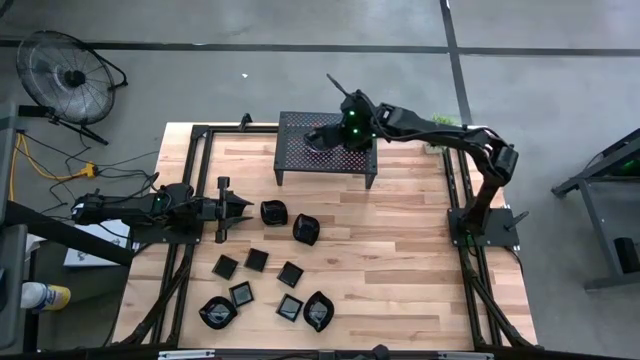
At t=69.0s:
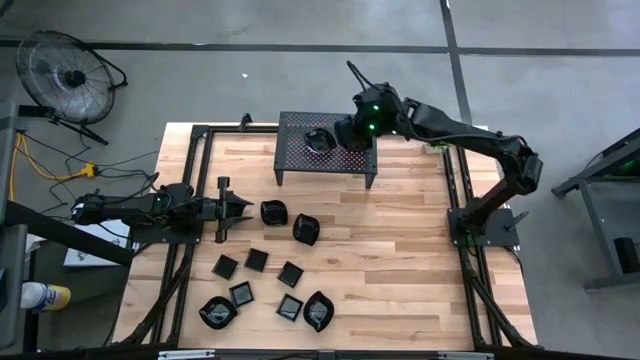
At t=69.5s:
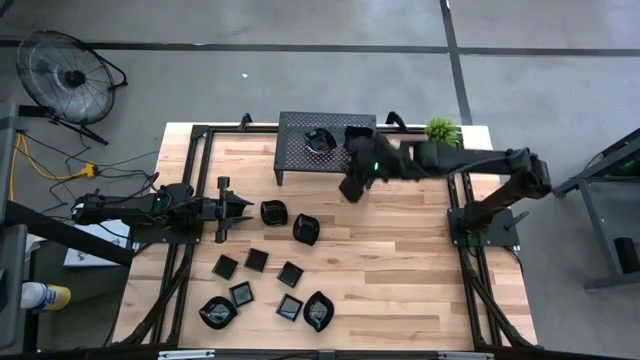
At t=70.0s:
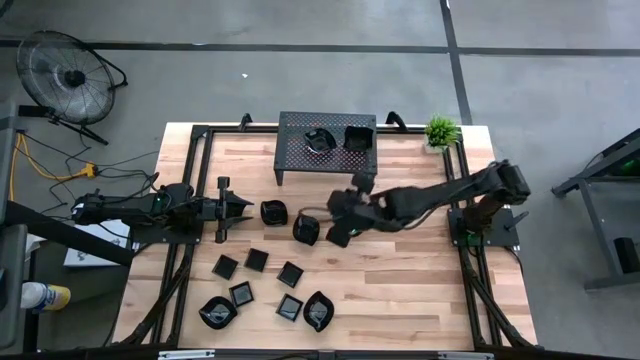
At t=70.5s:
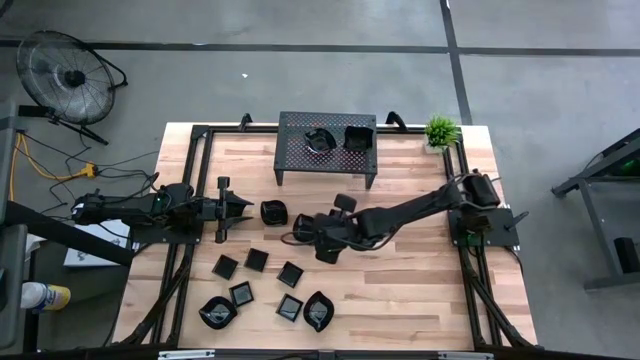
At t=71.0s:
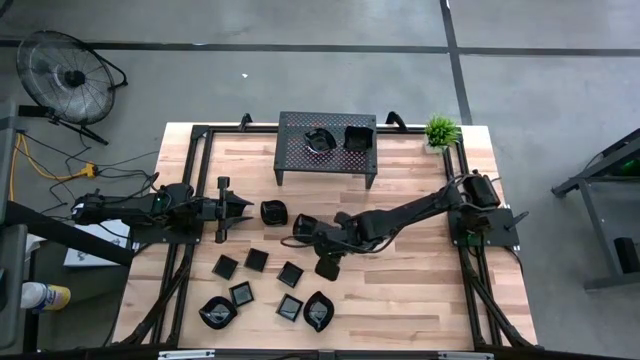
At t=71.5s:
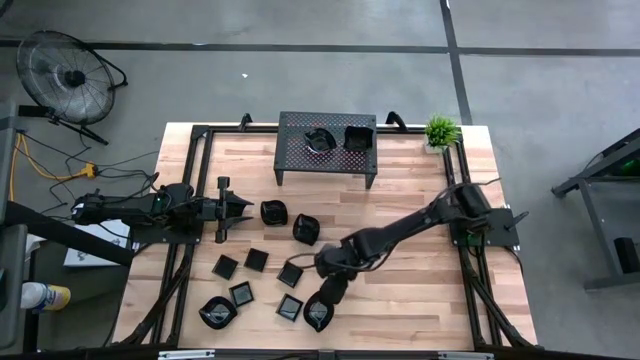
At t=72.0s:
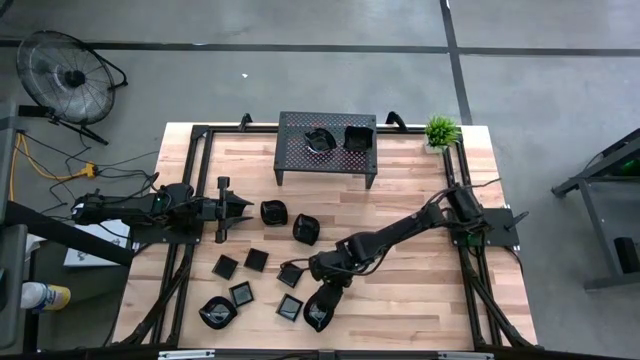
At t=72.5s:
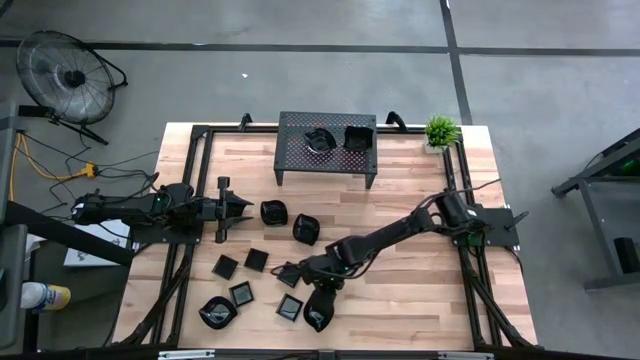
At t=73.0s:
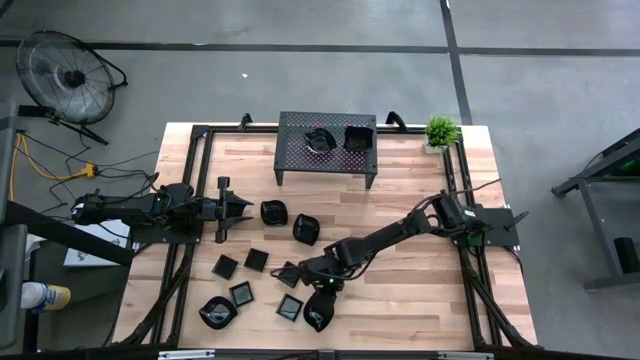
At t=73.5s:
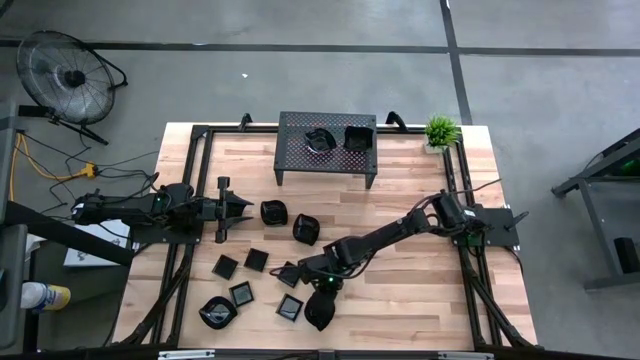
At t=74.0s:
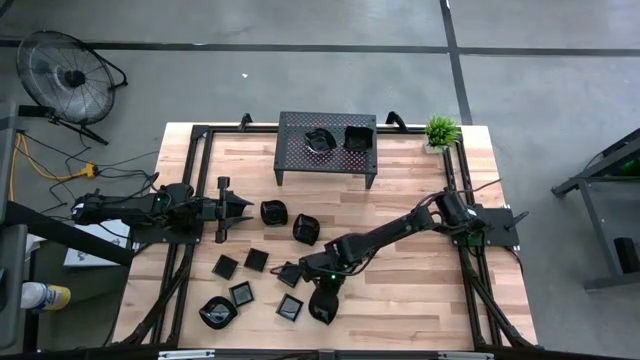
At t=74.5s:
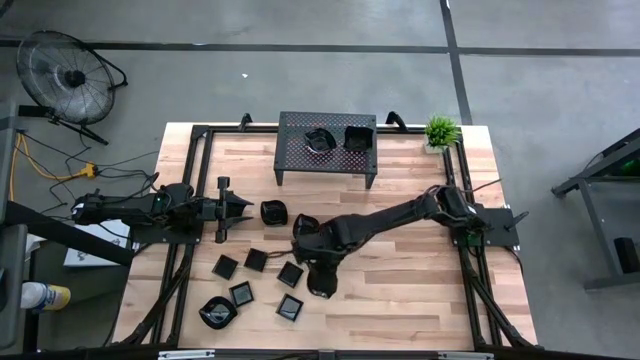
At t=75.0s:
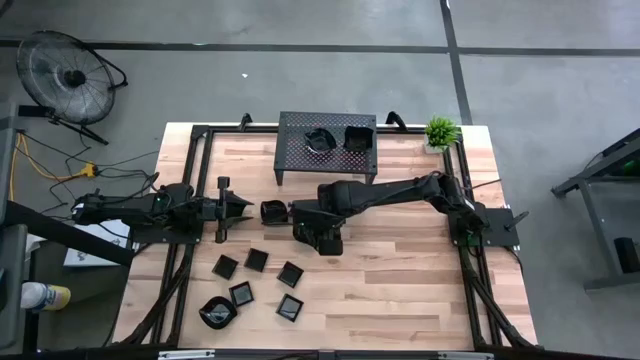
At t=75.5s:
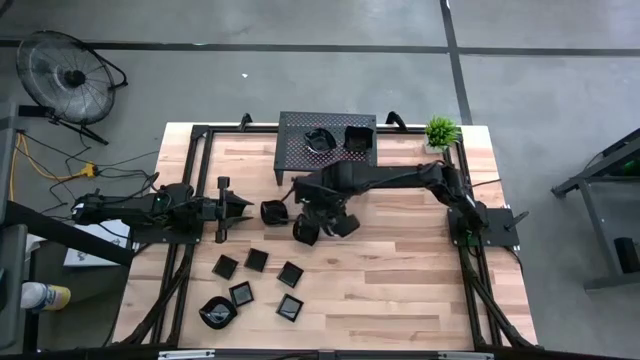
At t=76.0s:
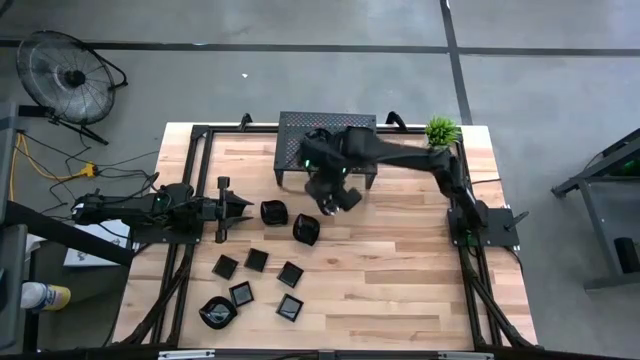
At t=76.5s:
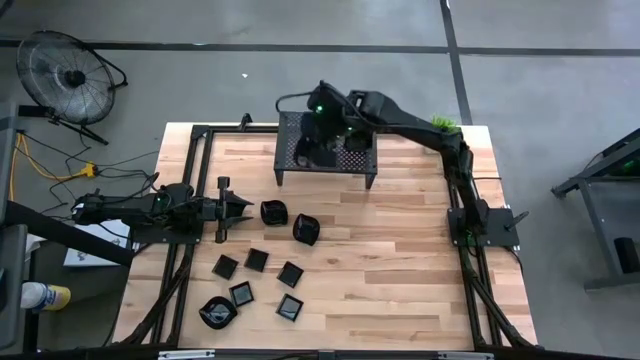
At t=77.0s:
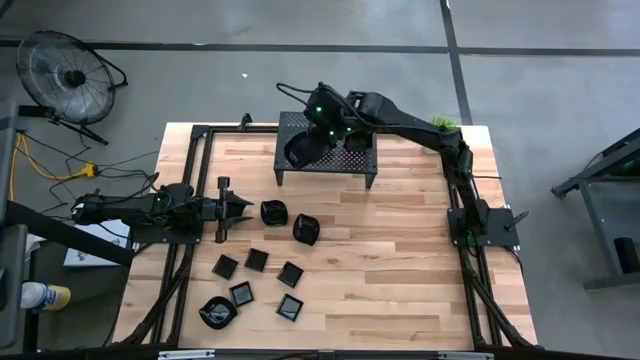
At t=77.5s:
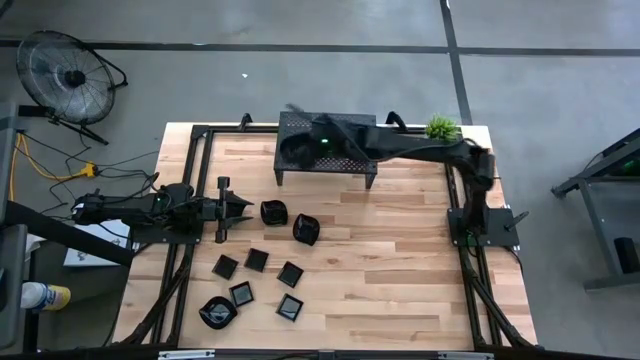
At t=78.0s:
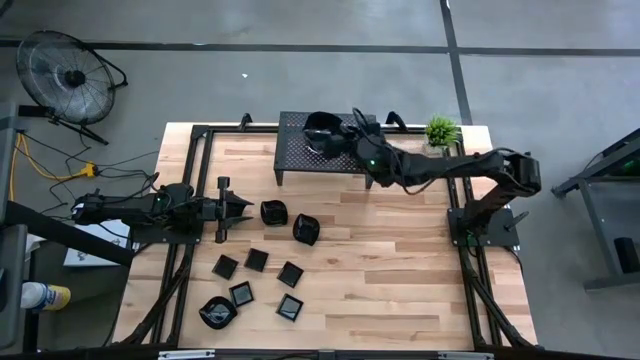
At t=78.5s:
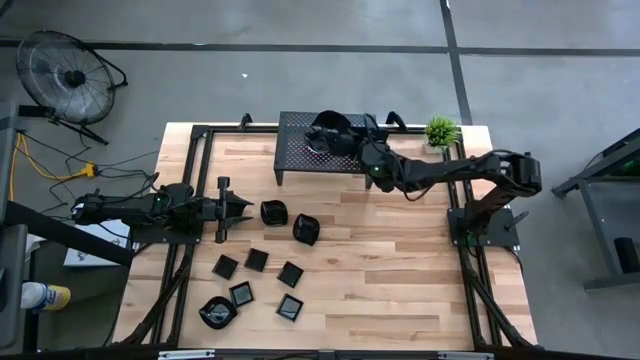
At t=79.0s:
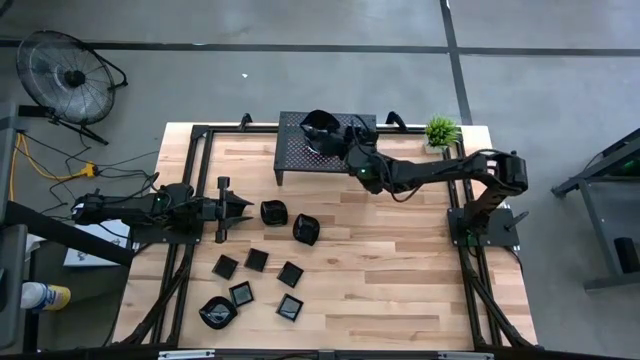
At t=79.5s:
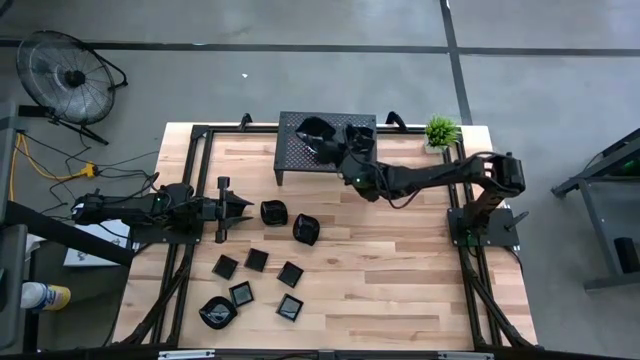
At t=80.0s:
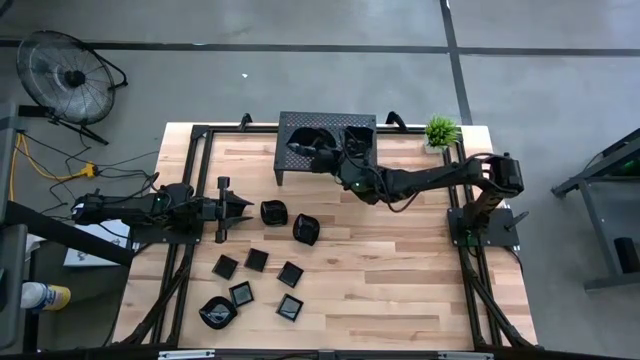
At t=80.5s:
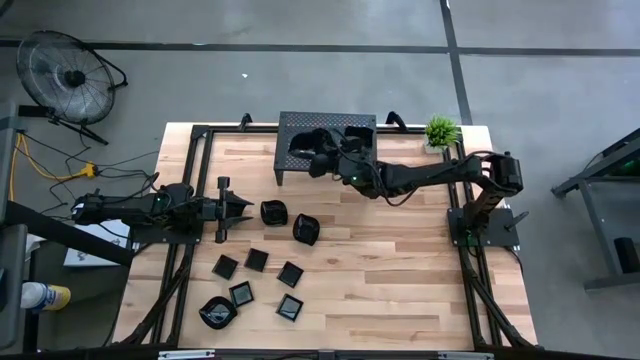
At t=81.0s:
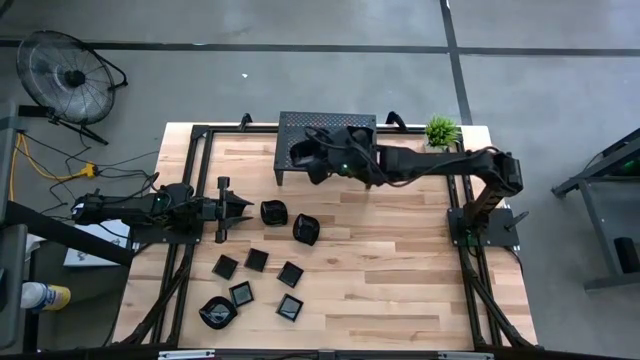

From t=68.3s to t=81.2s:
Task: Pick & Place Mini shaped plates
Stack the black leaf shaped plate on top of the black leaf shaped plate on the shelf

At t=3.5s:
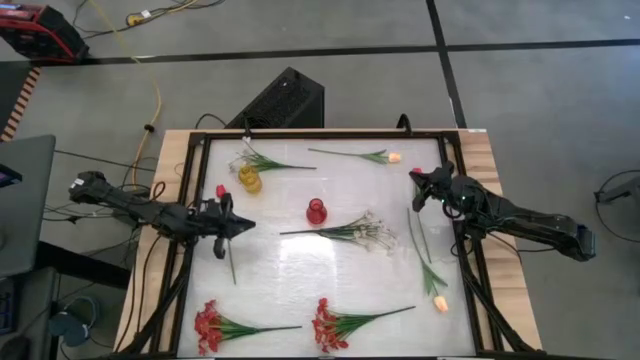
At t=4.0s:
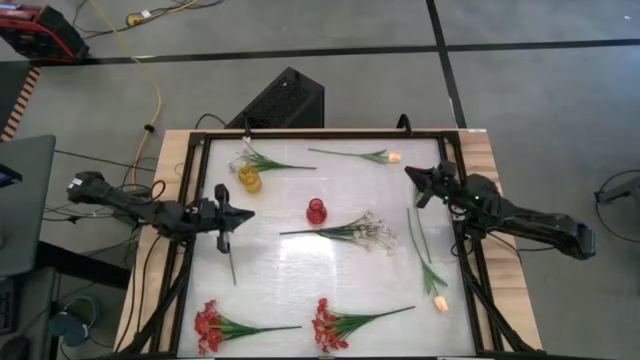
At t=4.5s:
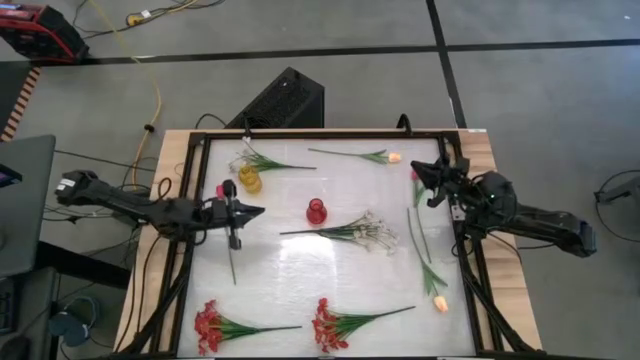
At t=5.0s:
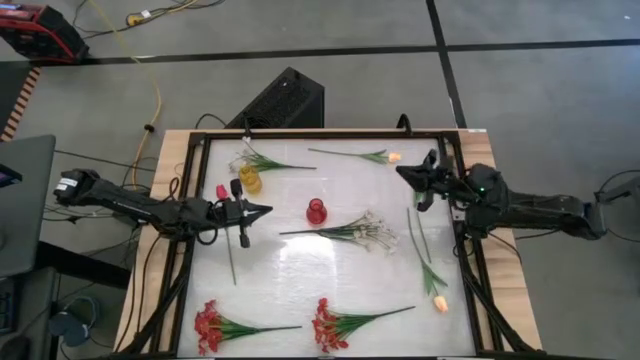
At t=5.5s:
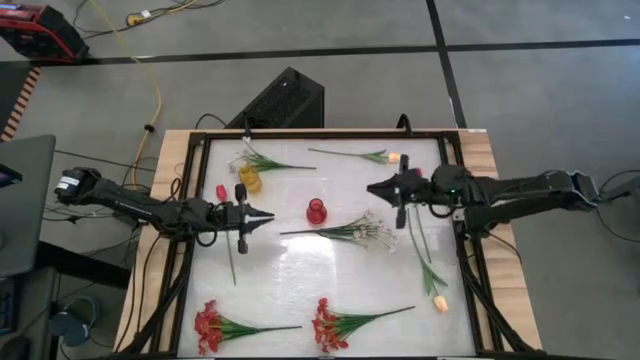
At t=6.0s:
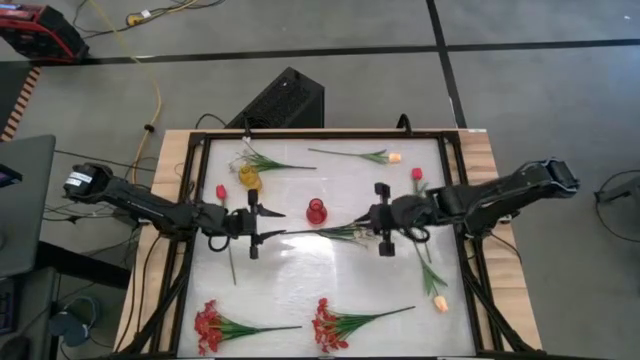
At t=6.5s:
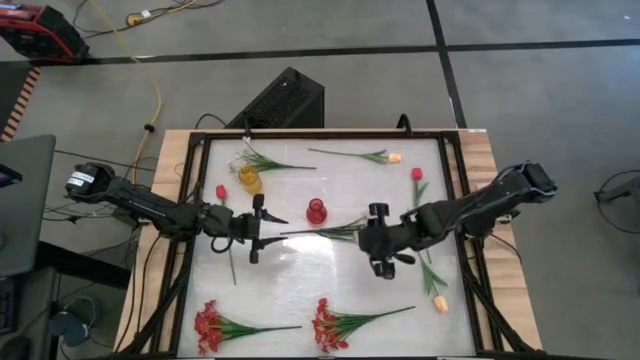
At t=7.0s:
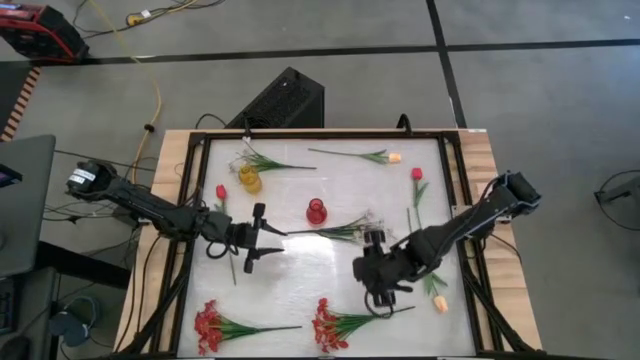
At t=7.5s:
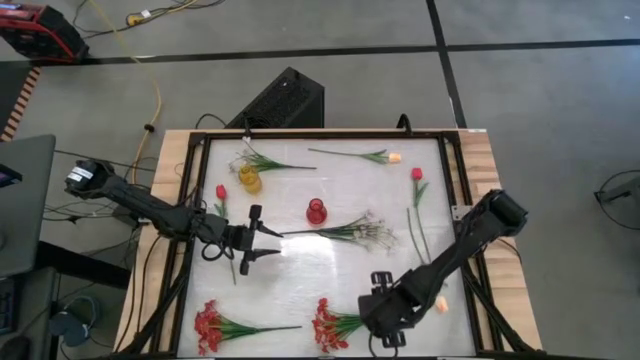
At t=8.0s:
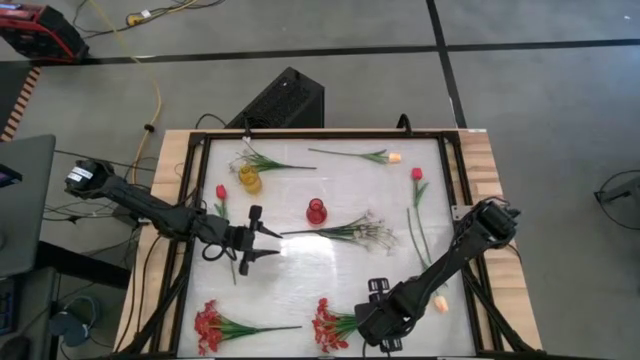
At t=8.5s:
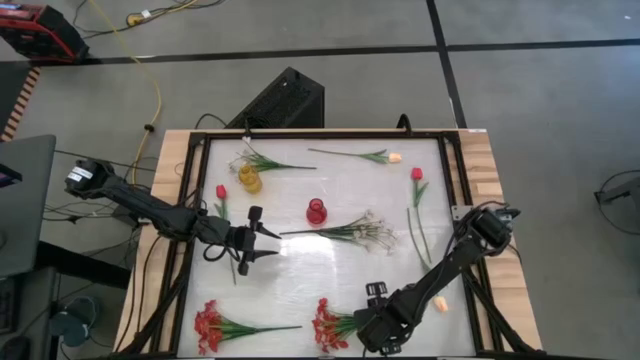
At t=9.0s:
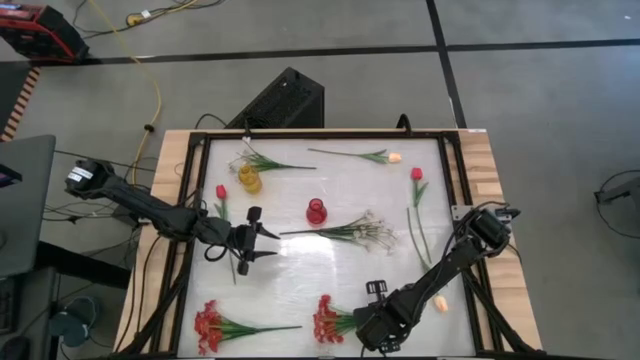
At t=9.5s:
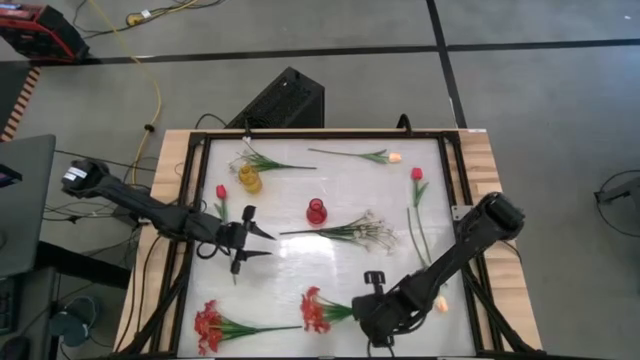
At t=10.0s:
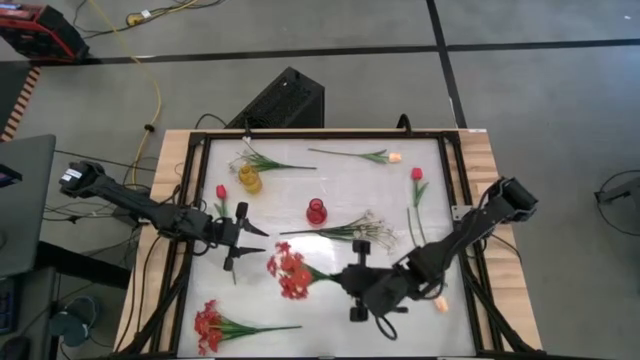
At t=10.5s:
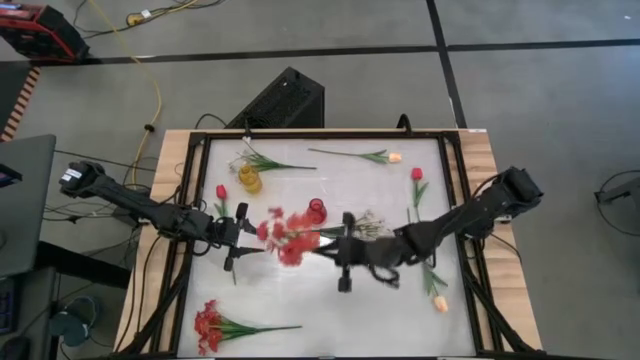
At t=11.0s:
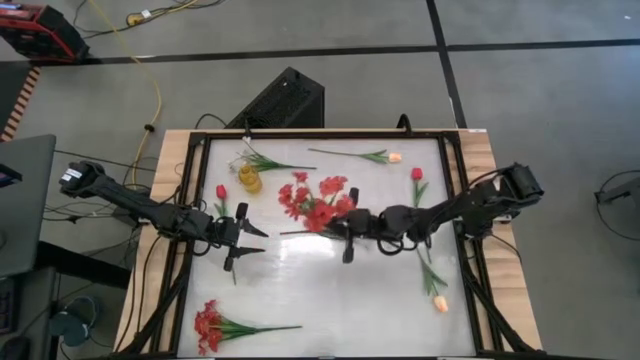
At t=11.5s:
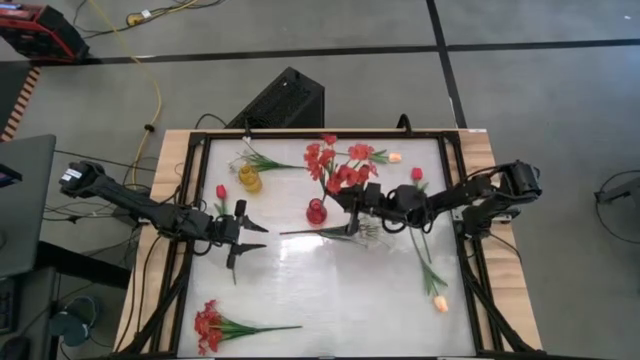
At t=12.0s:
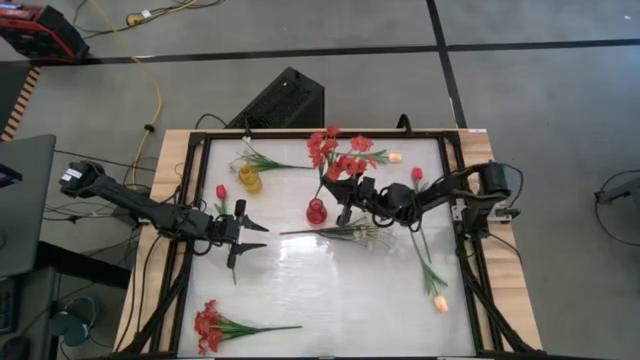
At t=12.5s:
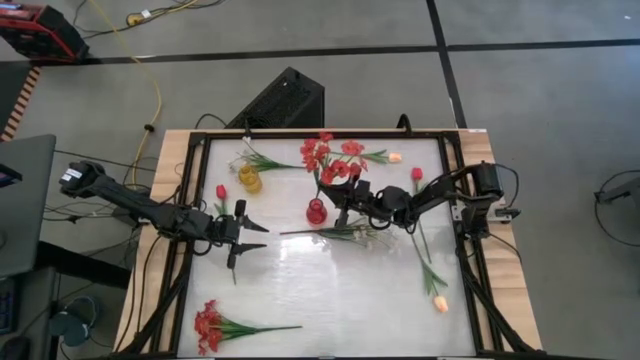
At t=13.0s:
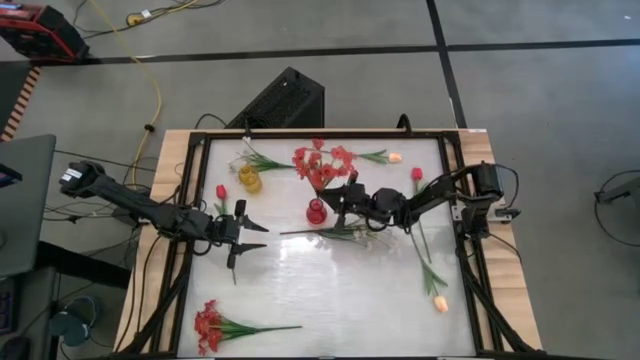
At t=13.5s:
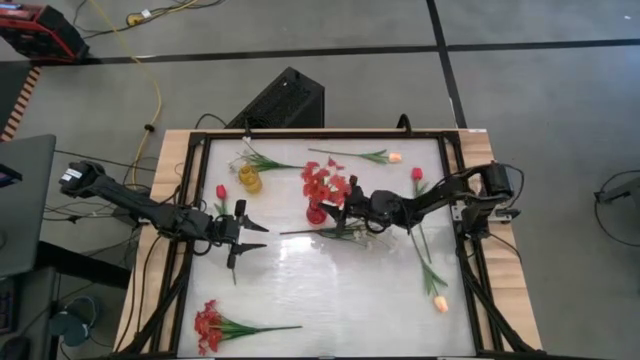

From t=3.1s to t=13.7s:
Task: Sort flowers into vase by color
Put the right orange flowers into the red vase
